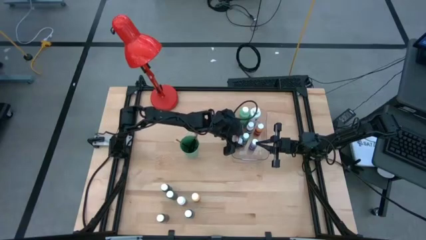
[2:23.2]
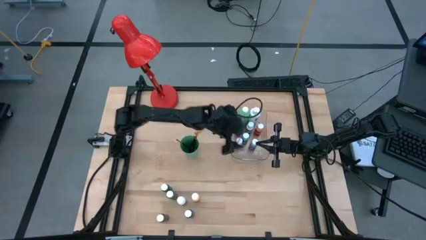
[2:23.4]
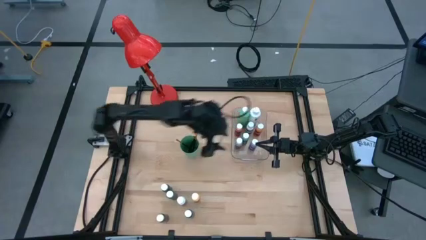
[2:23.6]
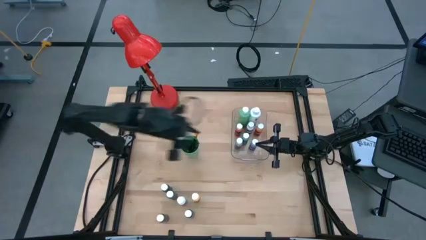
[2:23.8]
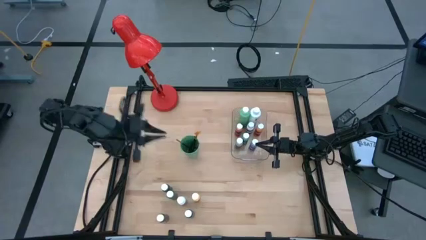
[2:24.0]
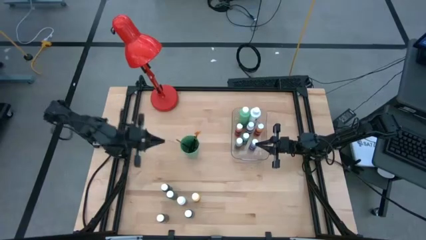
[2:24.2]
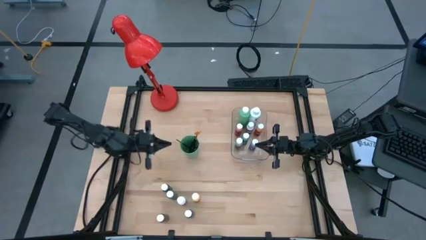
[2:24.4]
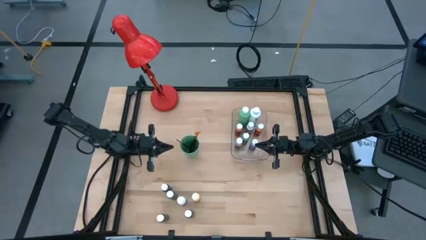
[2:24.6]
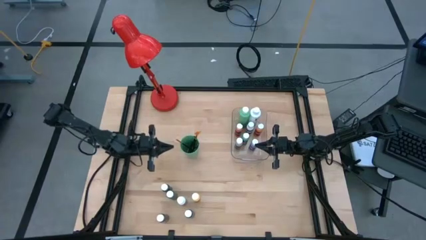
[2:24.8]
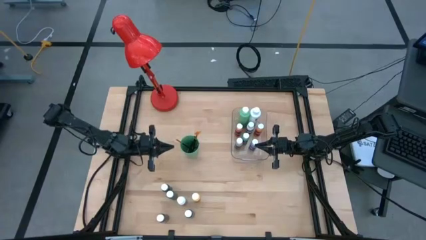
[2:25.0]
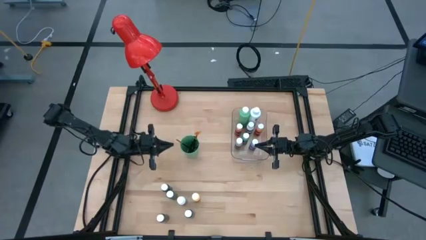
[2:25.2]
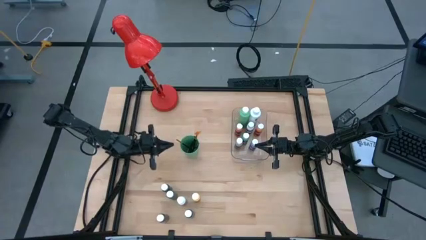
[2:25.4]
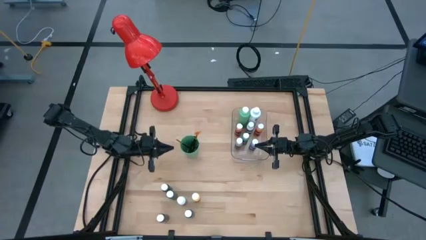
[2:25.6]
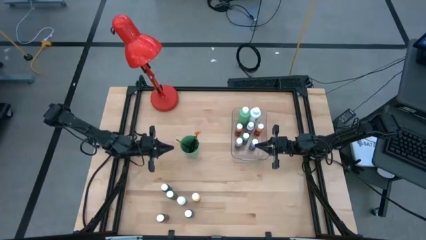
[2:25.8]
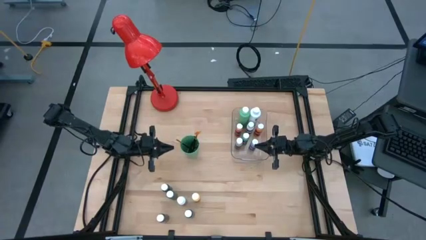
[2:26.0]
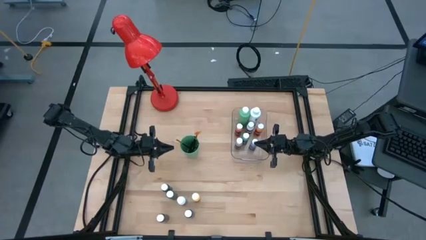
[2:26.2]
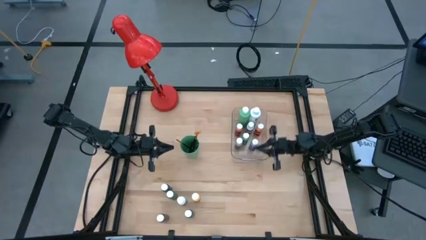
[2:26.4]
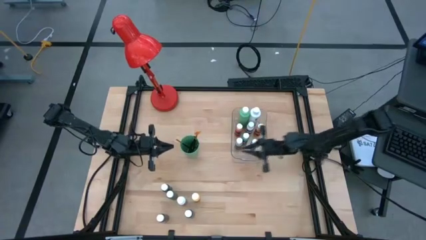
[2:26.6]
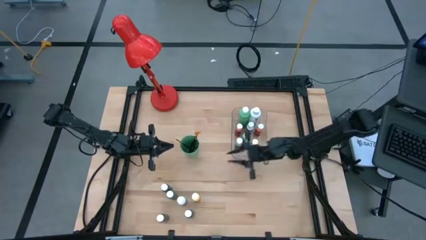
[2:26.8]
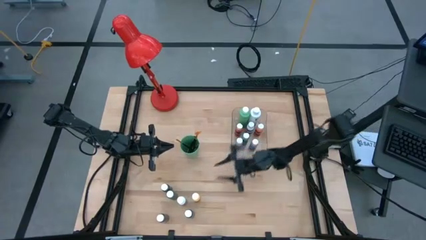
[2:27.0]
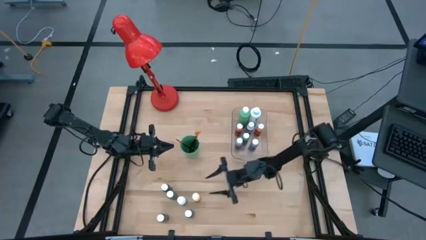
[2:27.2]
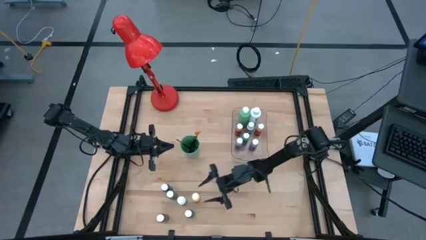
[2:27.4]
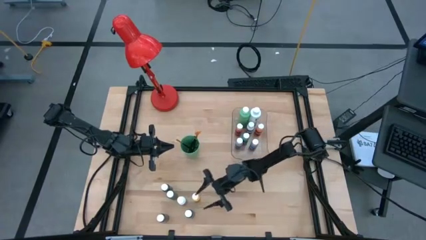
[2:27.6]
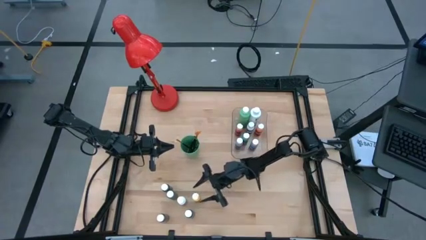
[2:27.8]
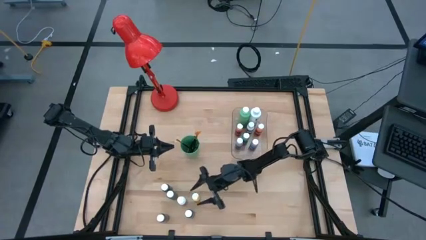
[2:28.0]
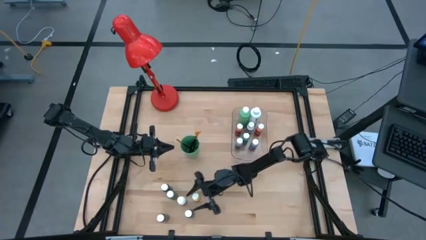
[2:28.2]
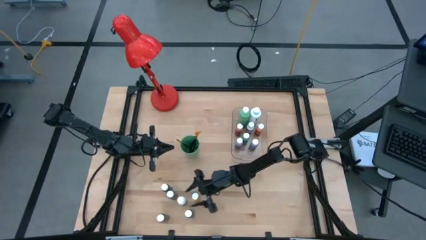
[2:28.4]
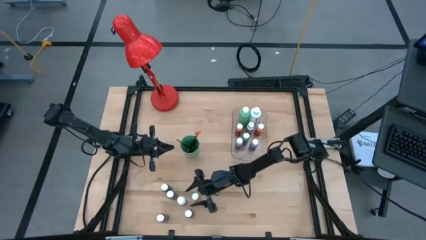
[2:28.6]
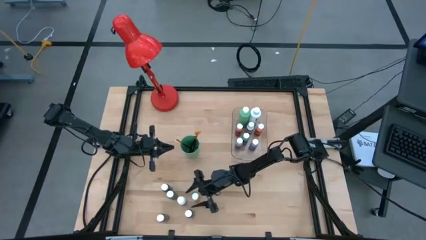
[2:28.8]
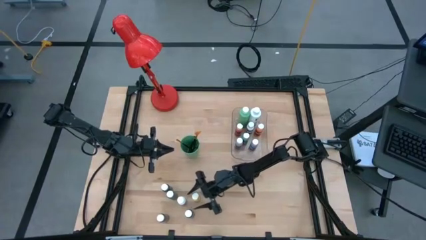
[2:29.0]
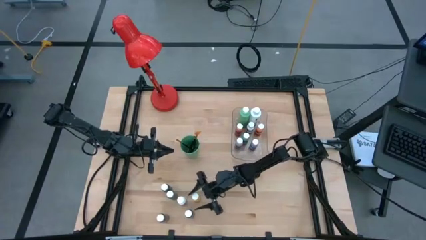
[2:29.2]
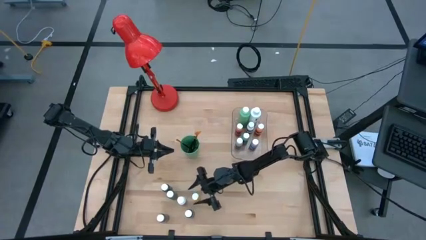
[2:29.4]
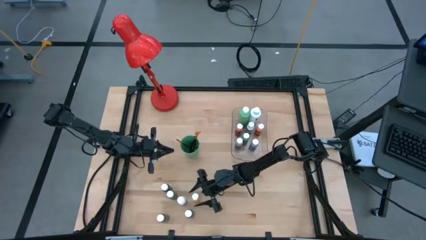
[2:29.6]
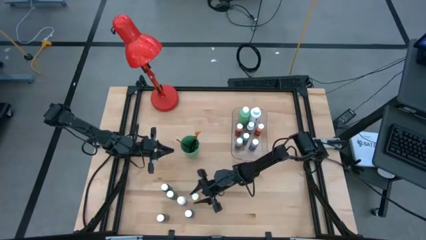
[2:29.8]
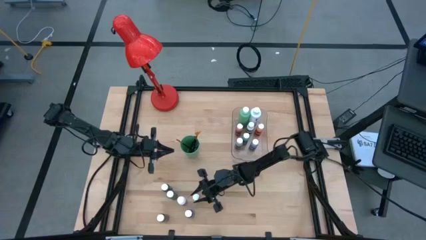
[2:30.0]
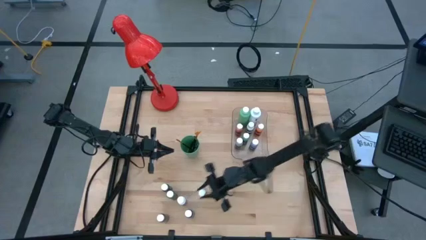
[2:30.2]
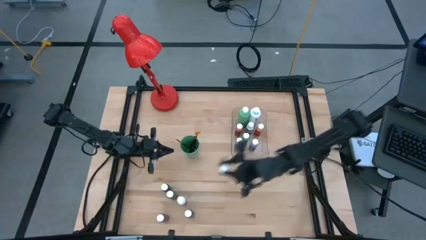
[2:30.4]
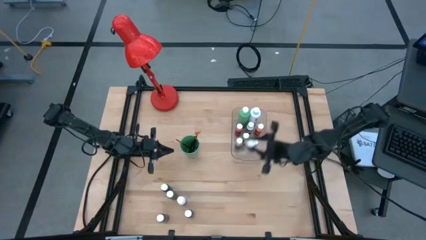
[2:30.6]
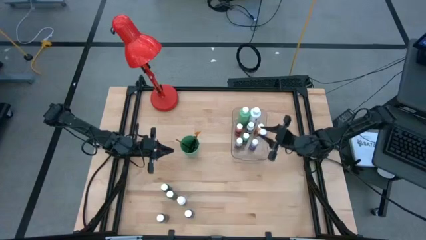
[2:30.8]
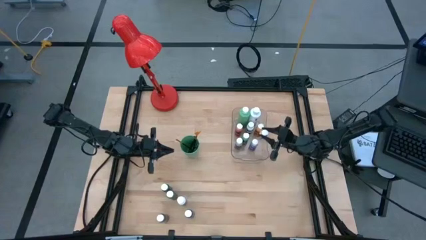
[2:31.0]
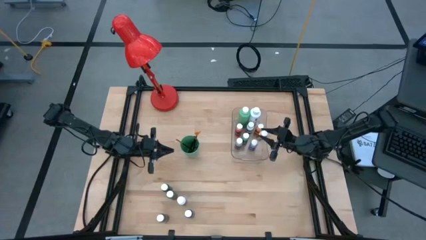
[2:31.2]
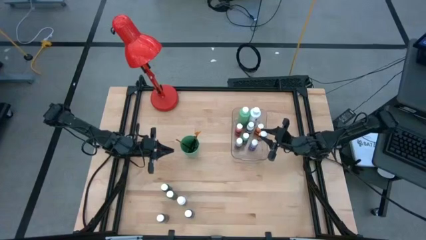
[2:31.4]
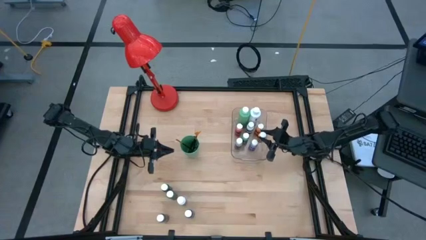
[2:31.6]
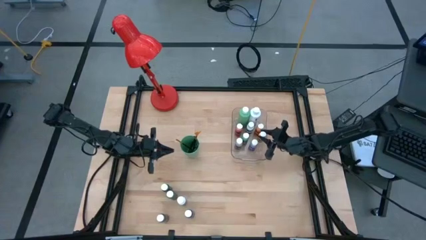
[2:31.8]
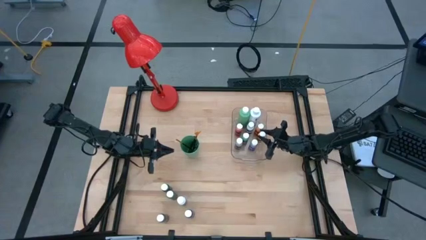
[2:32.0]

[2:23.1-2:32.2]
Task: Pick & Place Paint Supplies
Put the small yellow paint bottle into the transparent bin
